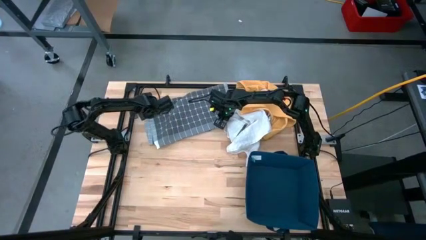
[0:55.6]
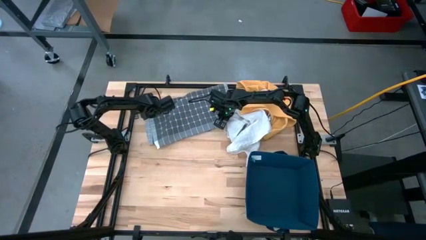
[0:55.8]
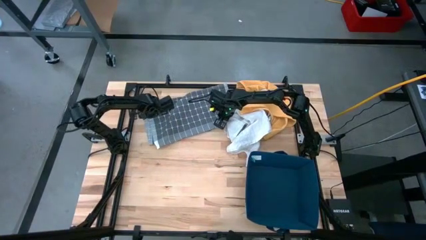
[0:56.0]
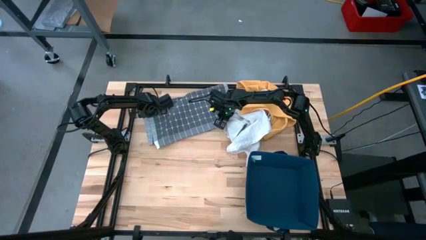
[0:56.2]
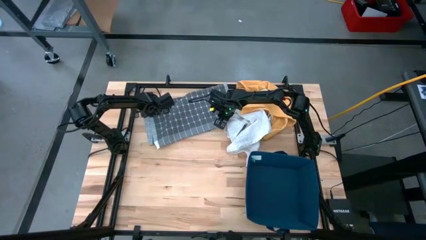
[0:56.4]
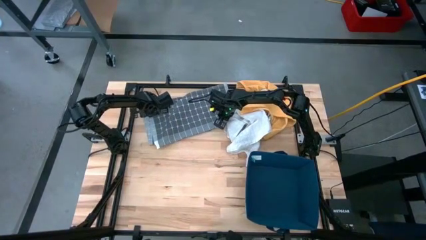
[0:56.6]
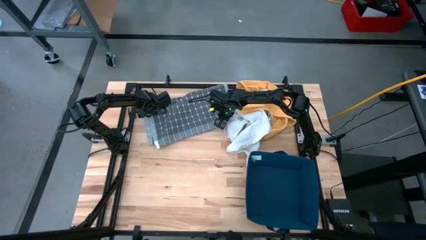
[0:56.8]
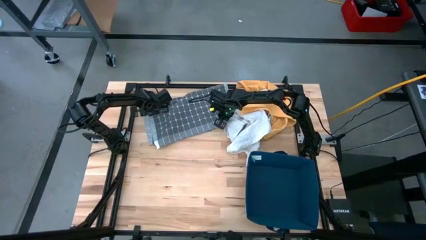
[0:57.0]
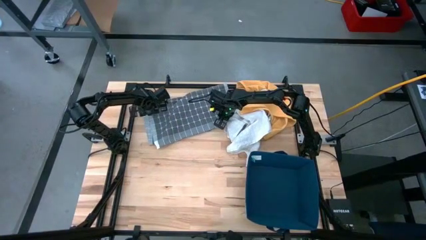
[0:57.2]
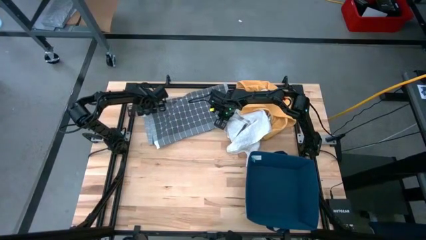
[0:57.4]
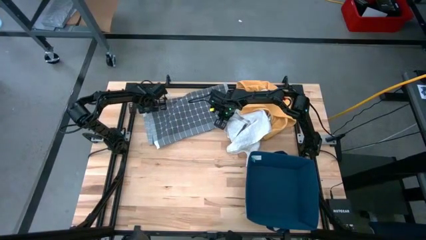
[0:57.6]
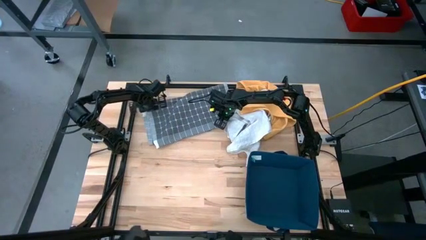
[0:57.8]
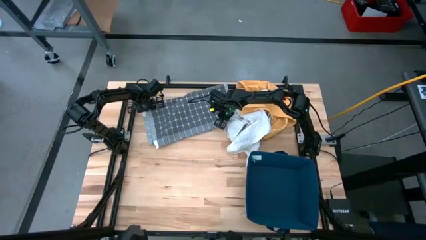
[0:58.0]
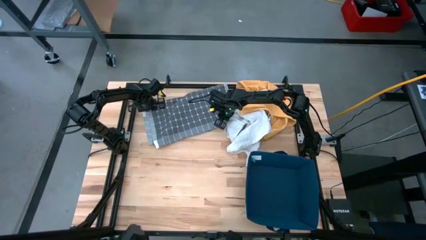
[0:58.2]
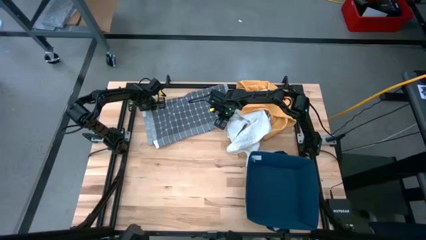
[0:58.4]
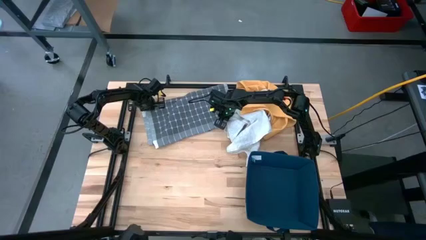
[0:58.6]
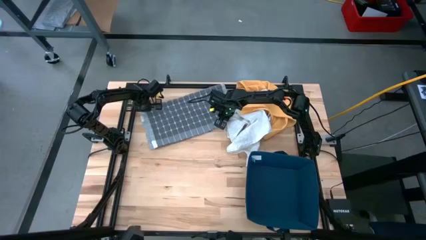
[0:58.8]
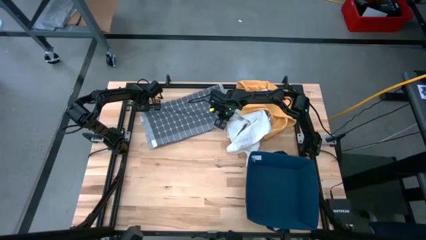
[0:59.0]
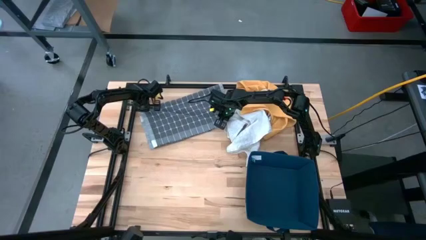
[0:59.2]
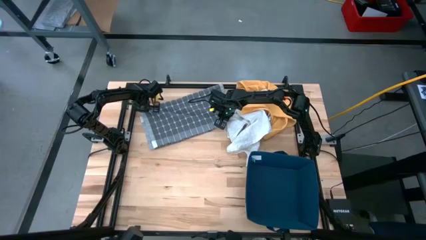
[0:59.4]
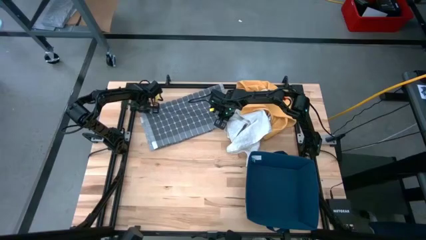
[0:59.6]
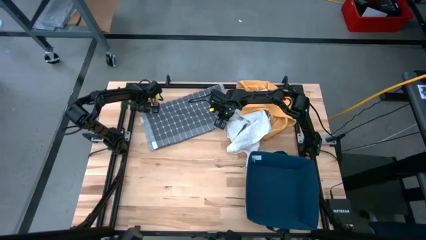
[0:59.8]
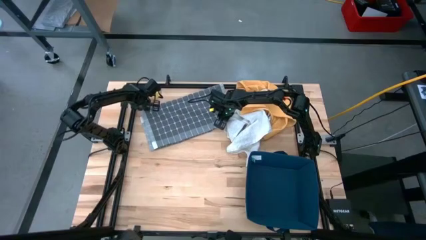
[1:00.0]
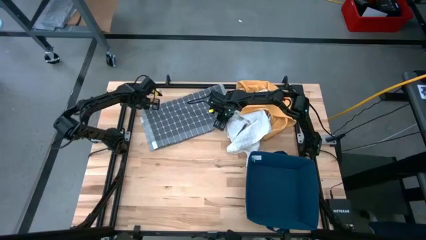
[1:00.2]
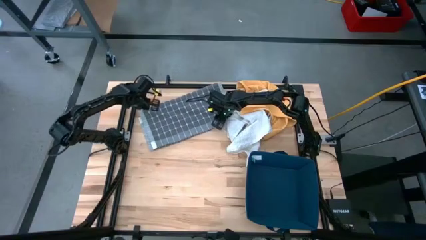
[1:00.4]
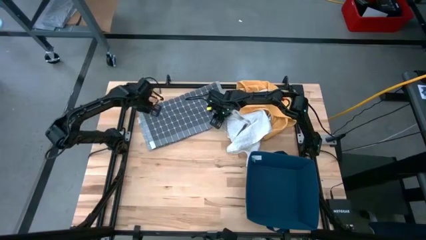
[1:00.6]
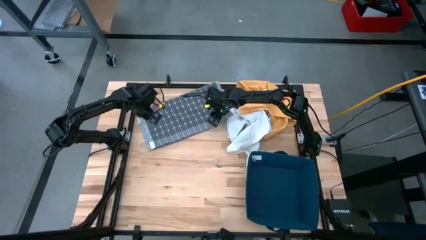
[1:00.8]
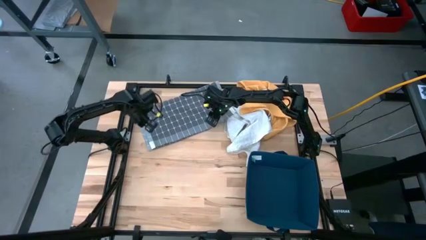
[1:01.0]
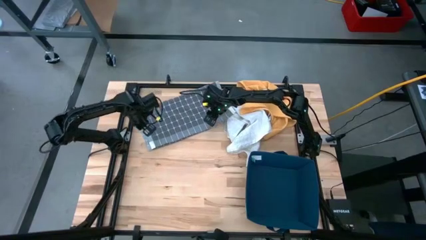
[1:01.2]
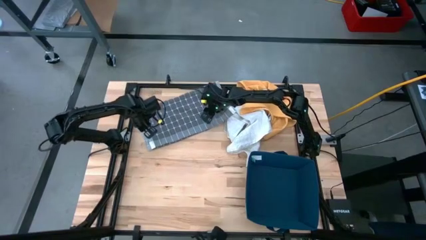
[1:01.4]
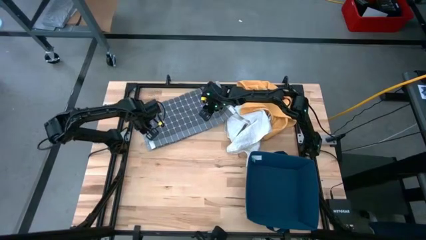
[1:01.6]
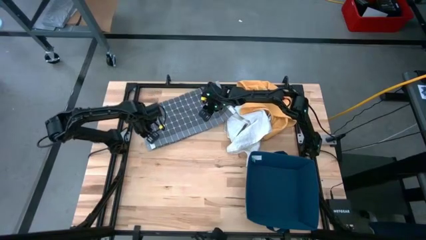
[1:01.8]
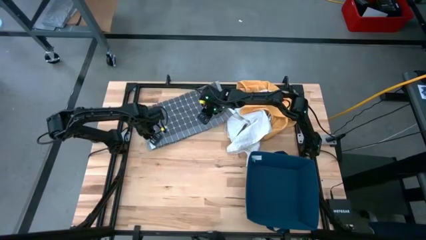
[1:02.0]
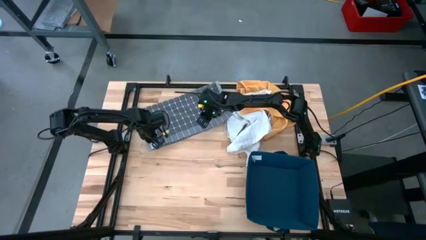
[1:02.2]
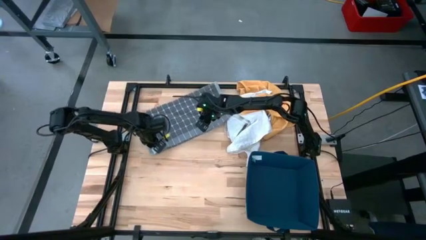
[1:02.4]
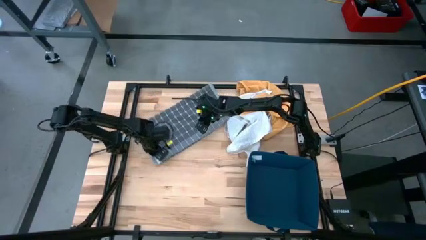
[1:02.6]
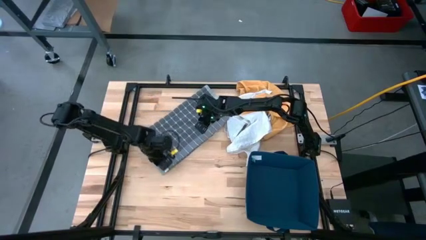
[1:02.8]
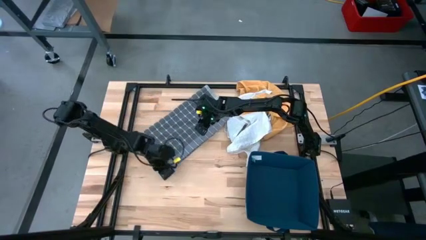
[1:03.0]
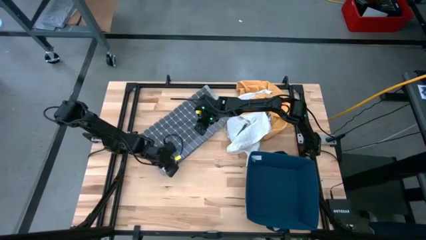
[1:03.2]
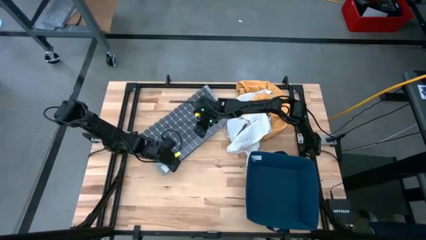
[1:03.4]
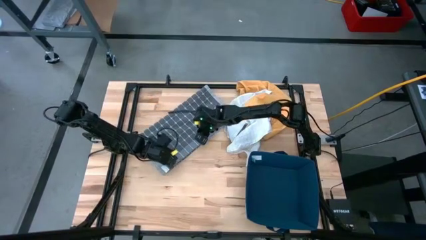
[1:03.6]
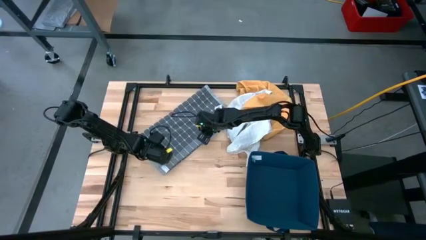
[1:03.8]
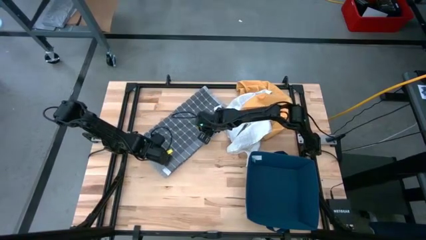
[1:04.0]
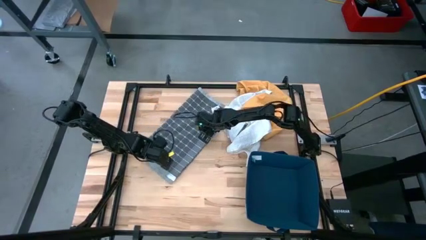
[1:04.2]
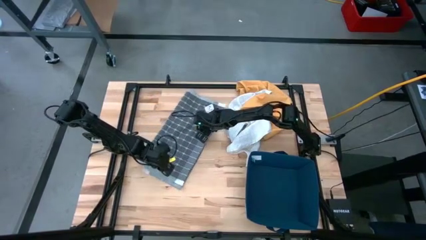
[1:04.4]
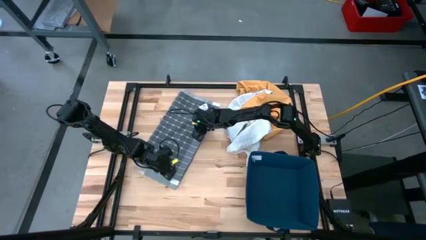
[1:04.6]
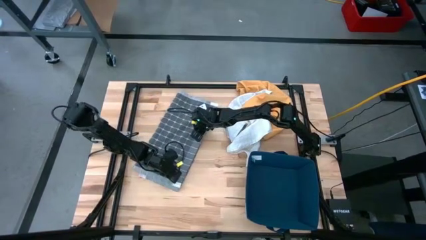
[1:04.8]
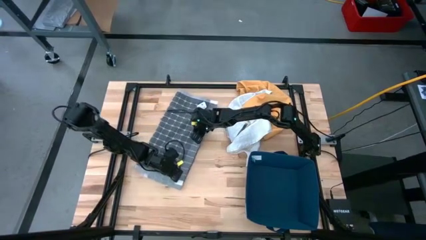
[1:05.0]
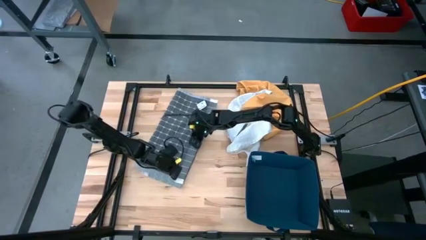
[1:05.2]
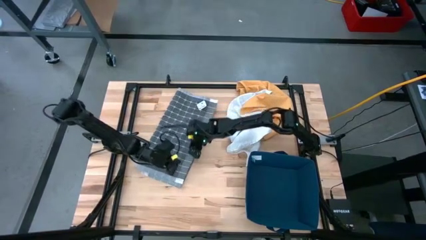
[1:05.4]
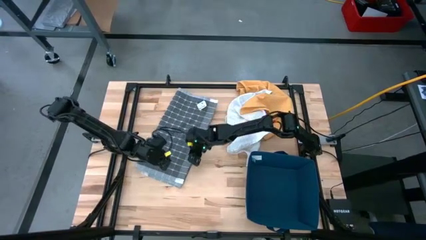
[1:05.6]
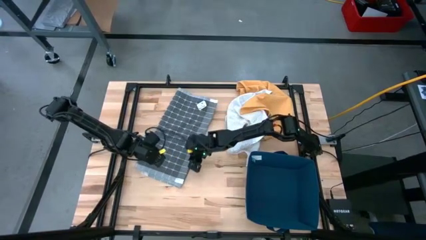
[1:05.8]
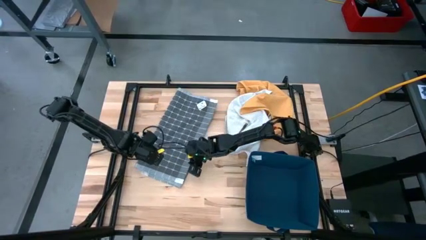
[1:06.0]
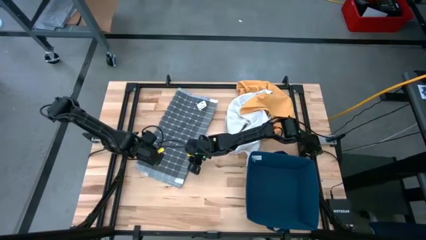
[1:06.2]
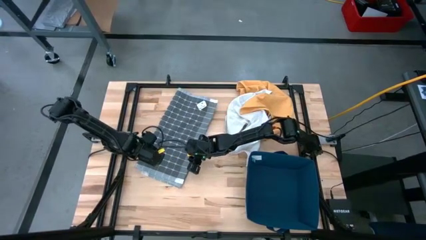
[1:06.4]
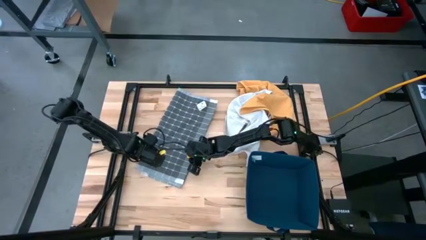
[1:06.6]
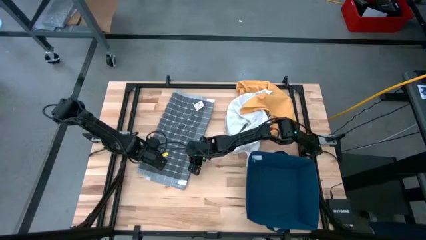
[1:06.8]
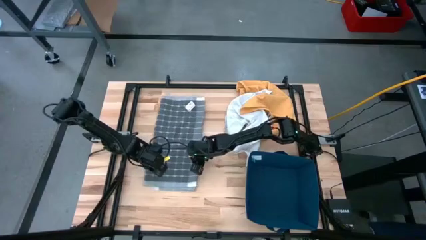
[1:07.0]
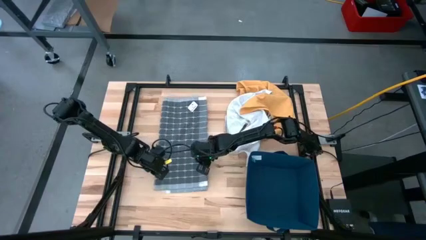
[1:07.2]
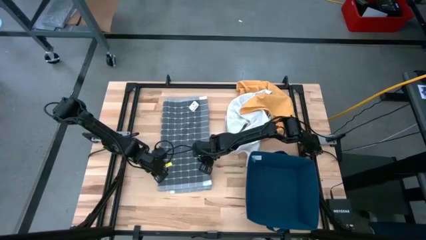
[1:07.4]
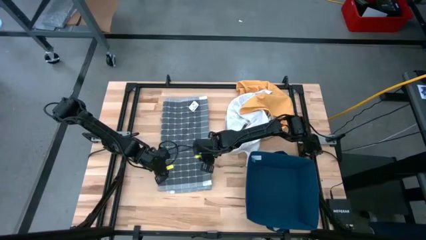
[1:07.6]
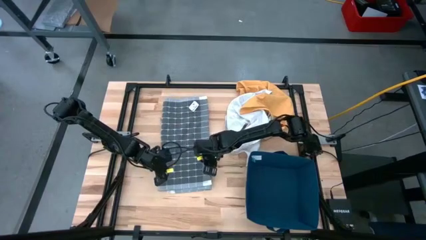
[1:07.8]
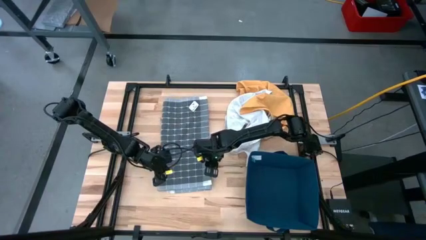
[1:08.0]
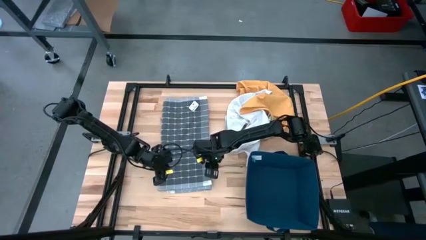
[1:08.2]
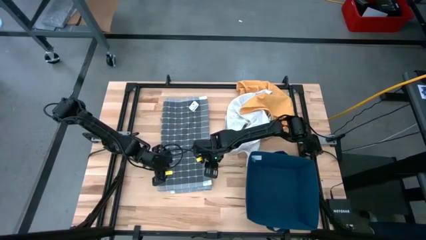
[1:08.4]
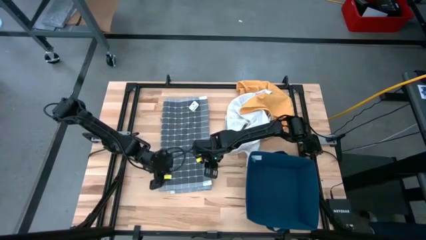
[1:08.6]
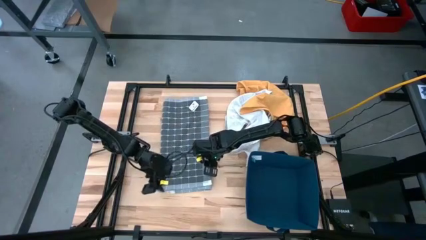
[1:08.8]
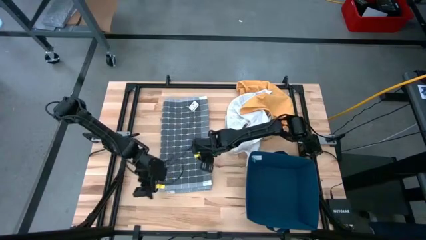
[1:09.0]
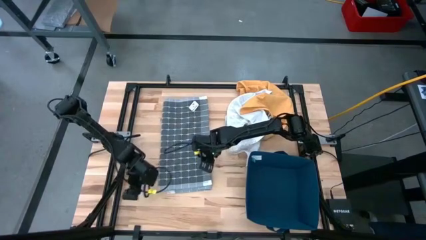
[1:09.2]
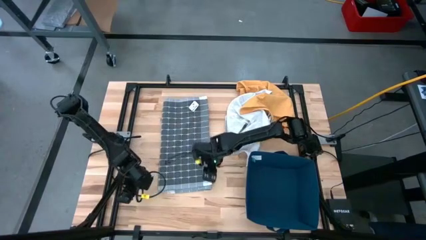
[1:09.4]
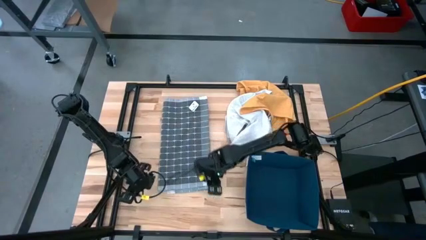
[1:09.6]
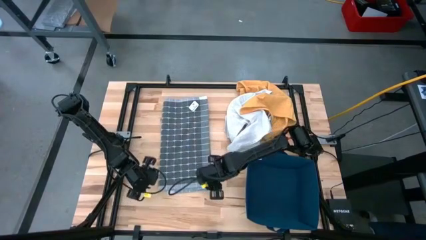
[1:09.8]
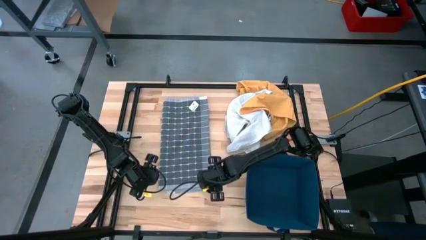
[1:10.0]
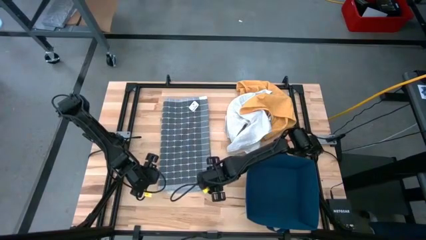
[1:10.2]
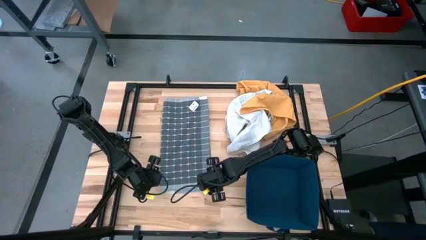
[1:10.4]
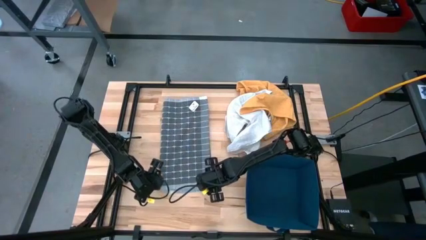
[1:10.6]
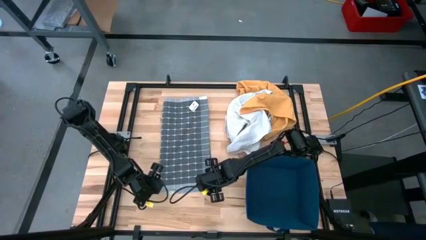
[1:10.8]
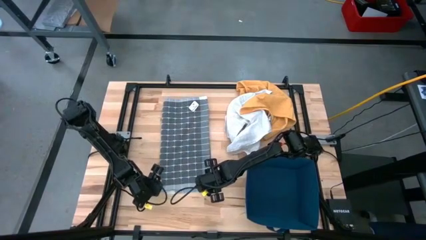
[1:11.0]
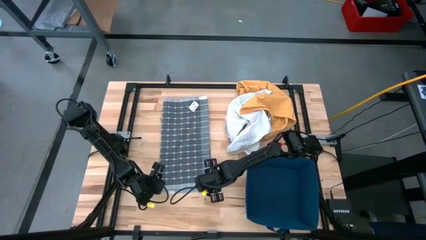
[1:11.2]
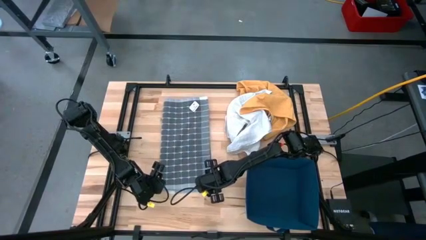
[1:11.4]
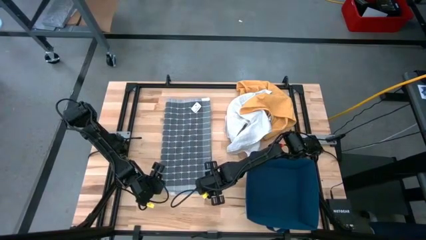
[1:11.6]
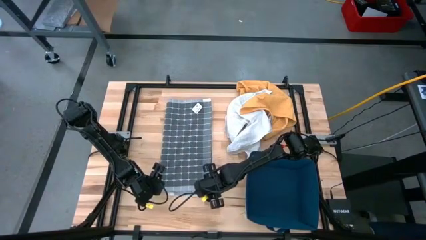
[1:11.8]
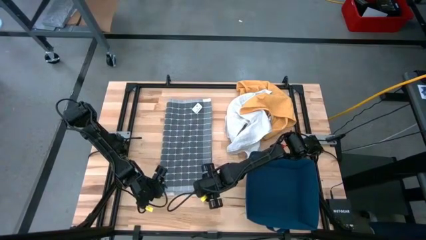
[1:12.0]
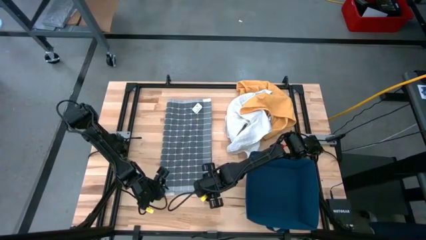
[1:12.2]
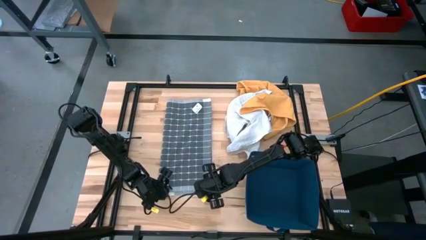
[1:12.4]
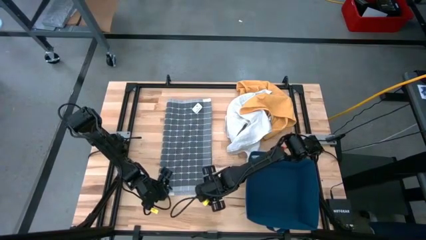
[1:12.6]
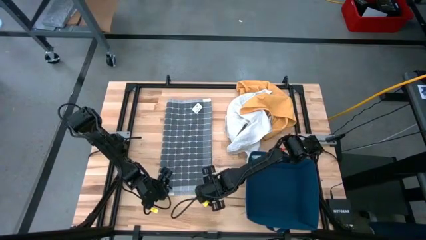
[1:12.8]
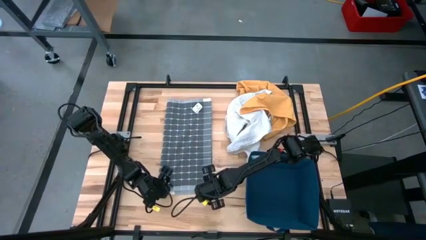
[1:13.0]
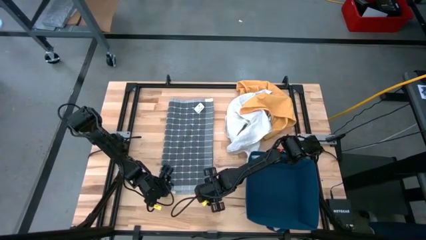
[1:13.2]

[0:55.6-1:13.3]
Task: Fold towel
Fold the gray towel
